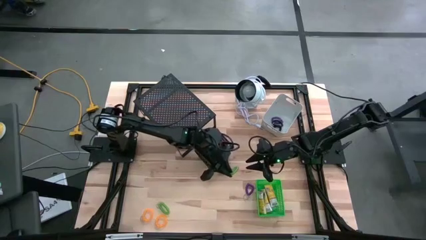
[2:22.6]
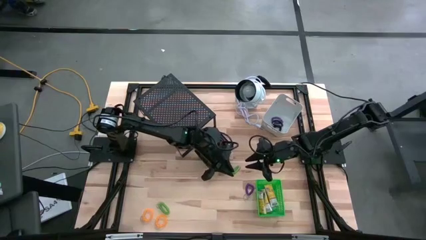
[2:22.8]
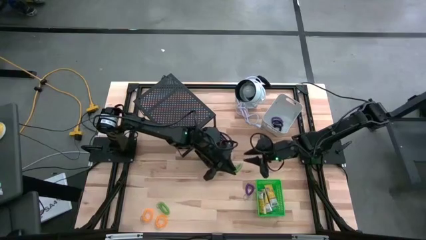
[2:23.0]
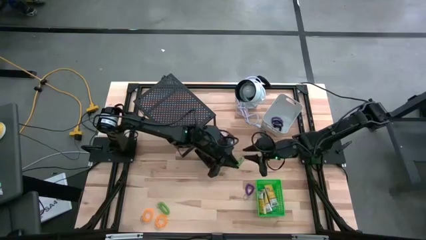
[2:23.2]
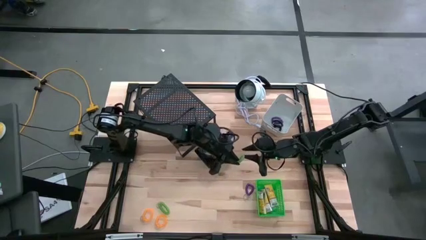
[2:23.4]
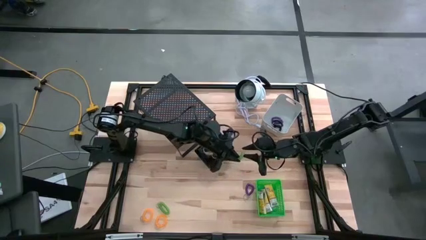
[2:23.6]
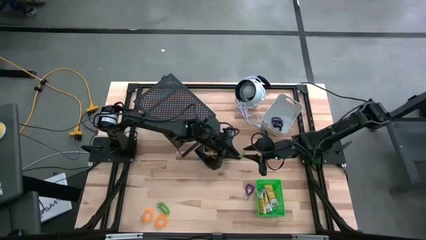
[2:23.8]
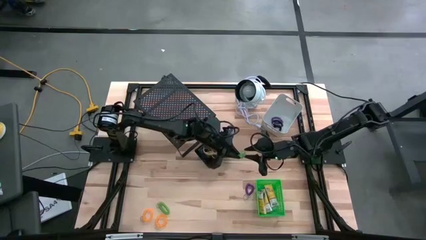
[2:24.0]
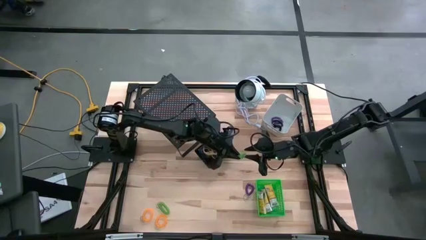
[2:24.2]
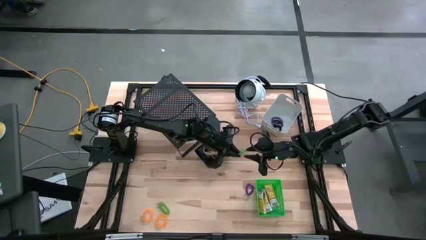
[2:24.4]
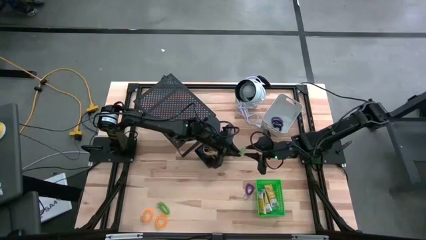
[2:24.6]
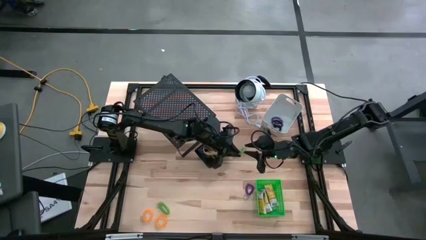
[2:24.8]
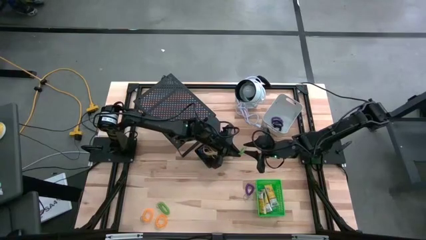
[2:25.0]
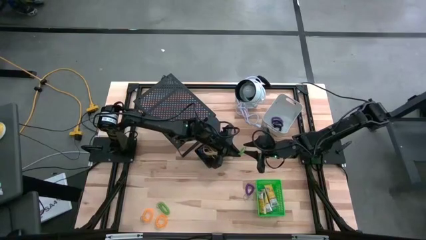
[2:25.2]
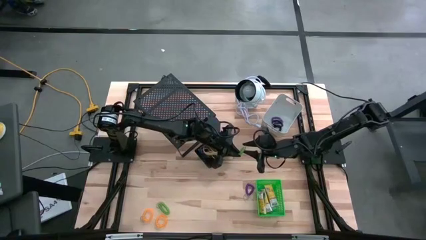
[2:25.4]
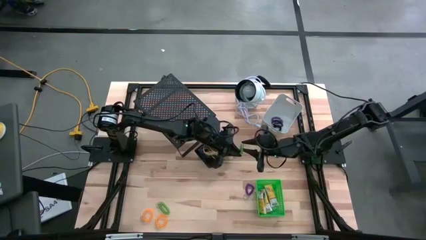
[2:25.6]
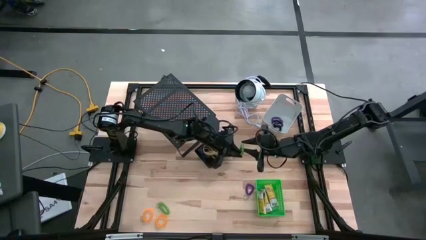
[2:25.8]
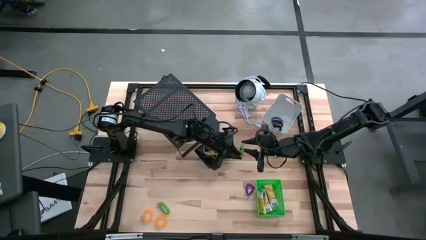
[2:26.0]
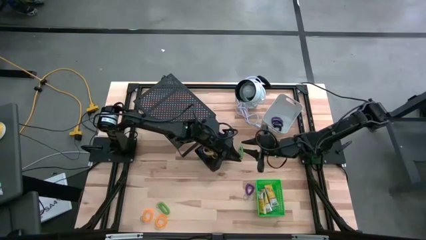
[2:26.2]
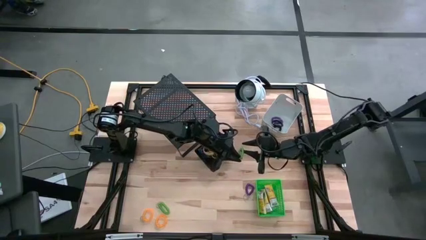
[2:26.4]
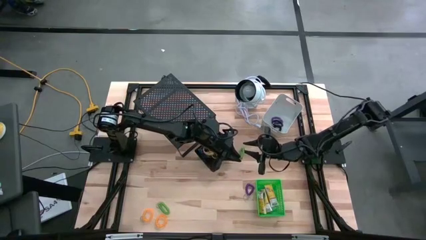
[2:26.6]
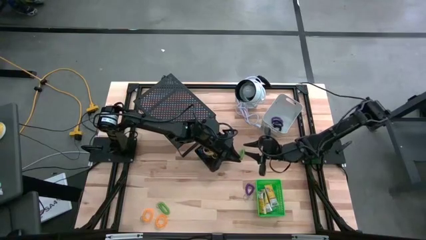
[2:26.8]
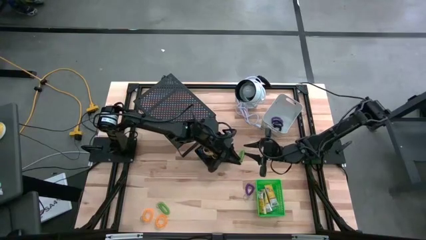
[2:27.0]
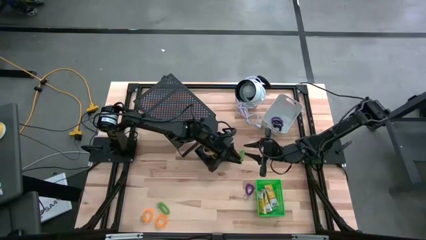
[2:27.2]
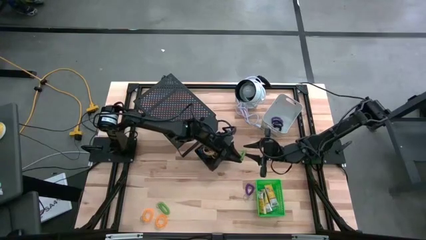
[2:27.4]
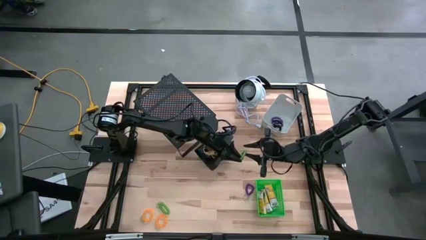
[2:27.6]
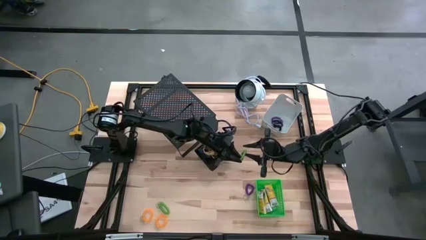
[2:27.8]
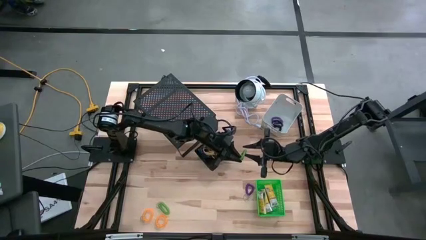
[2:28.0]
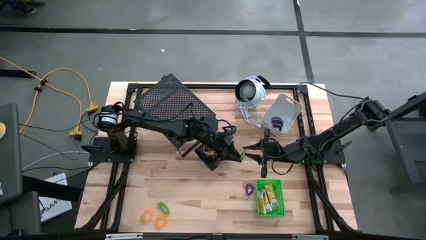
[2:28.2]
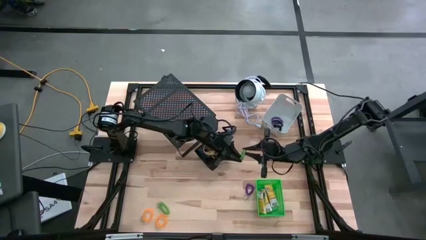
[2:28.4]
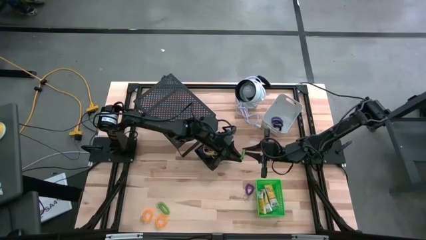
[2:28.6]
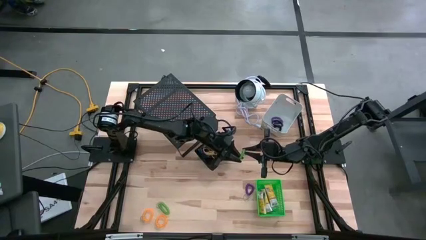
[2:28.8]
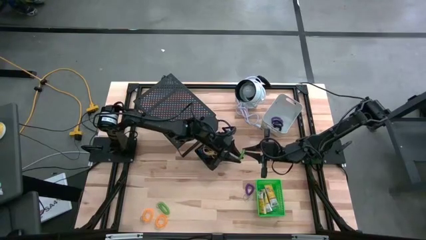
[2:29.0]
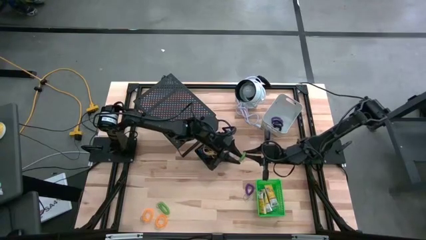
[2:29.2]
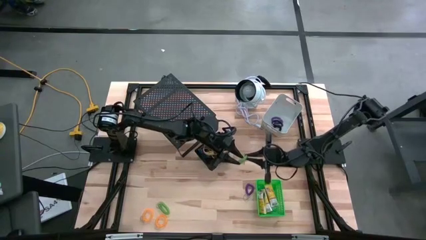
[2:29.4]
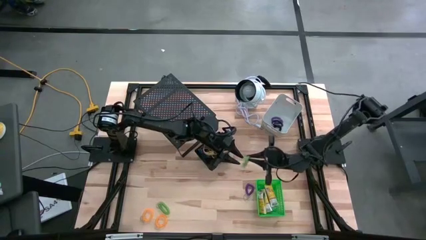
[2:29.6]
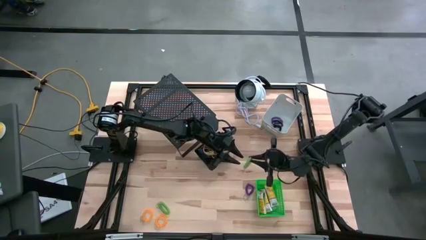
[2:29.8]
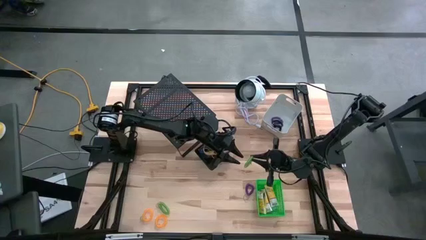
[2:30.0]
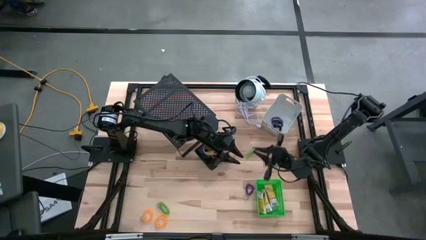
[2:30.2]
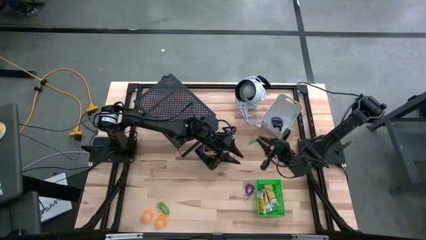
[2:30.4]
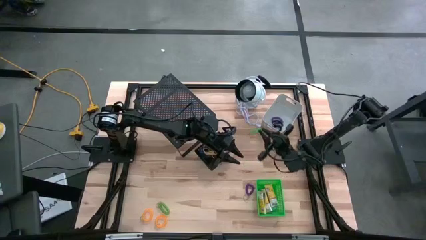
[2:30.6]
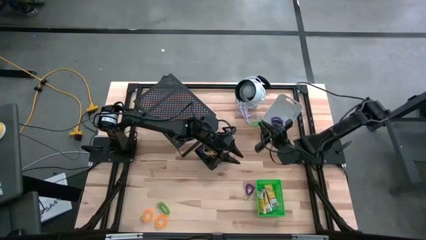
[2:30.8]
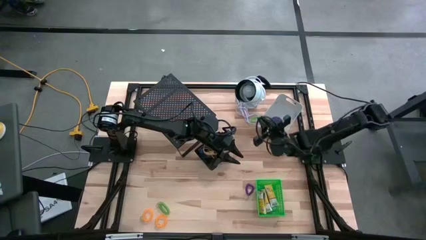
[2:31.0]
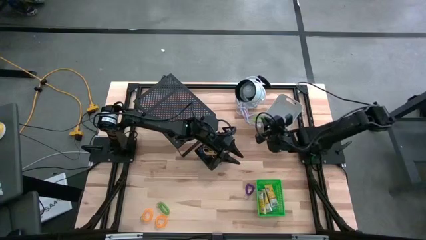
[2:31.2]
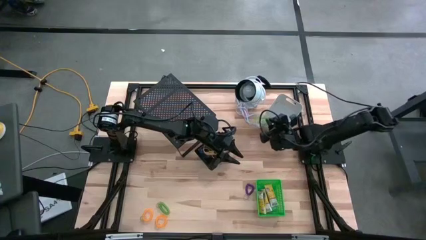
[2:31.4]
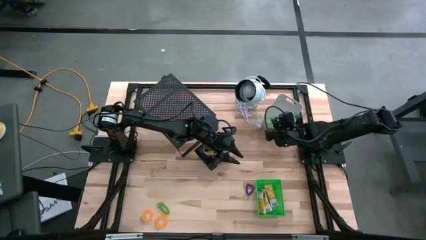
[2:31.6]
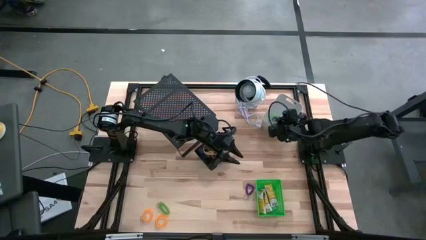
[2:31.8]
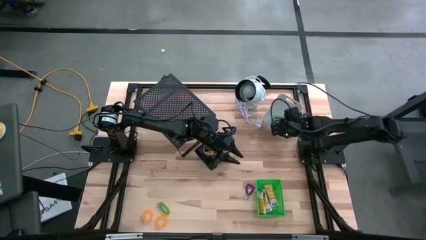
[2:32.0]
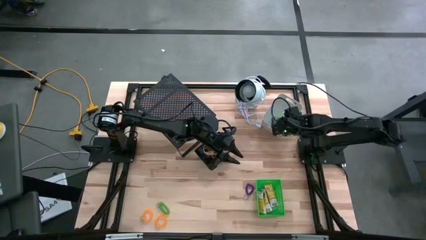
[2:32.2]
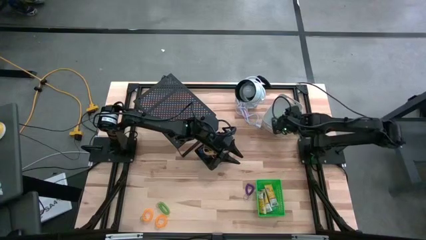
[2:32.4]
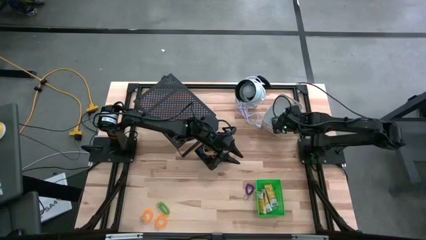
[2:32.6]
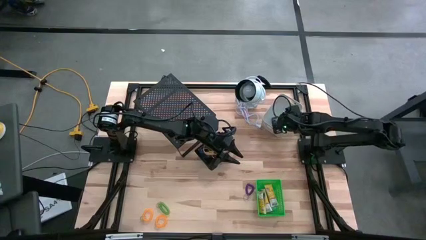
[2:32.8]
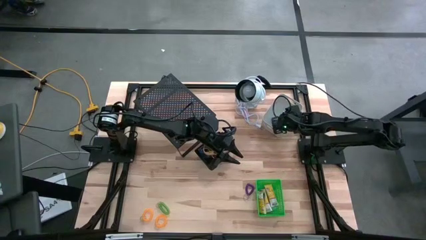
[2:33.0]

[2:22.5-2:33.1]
Task: Pick & Place Office Desk Supplies
Put the bottom green spring keychain into the white bin

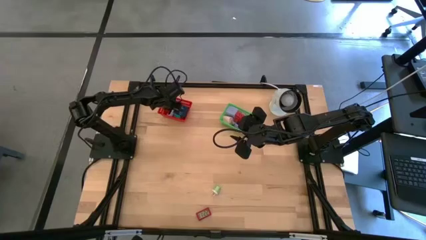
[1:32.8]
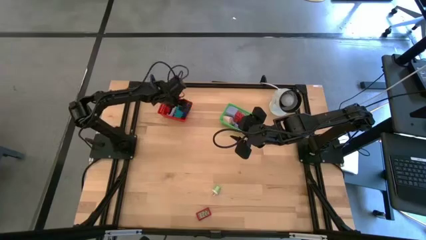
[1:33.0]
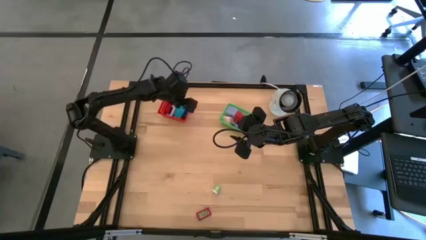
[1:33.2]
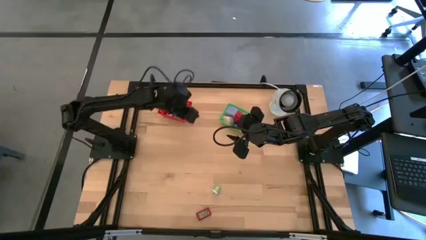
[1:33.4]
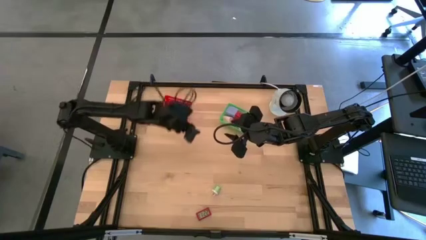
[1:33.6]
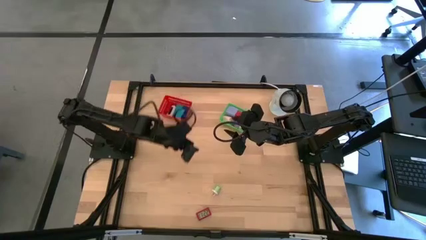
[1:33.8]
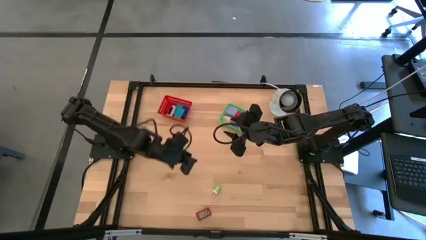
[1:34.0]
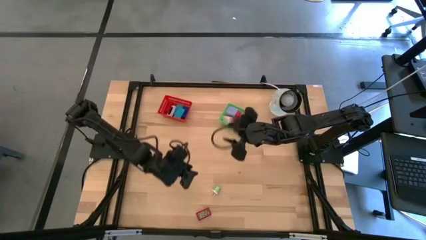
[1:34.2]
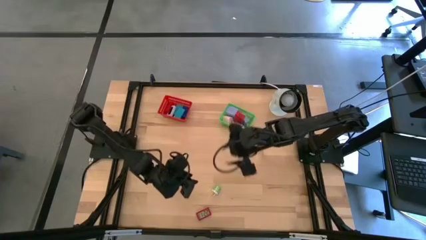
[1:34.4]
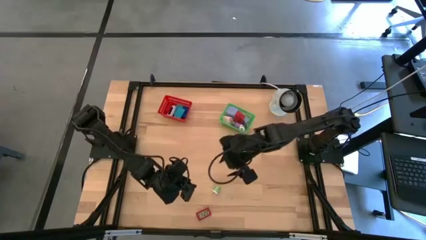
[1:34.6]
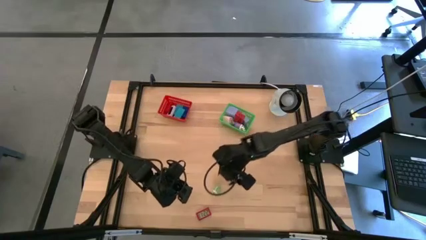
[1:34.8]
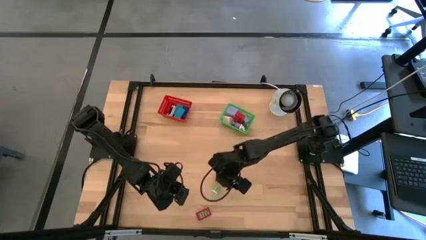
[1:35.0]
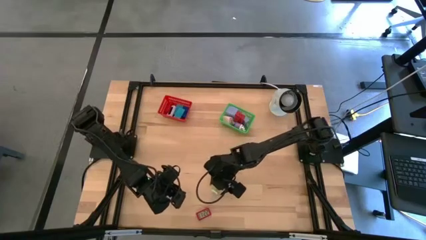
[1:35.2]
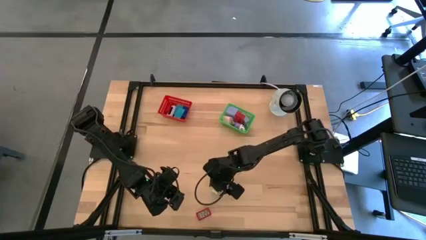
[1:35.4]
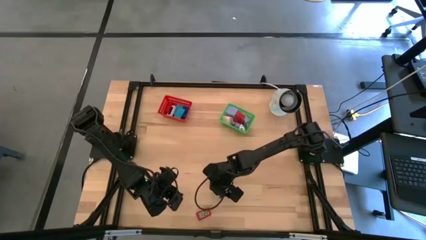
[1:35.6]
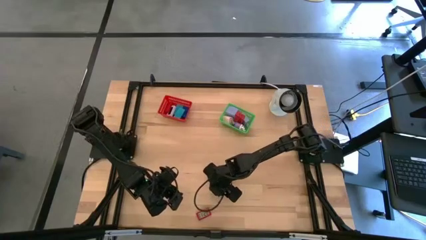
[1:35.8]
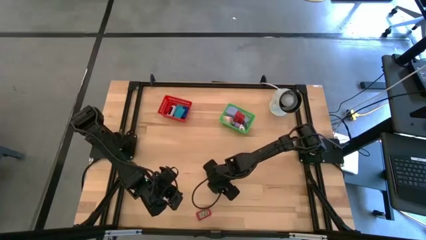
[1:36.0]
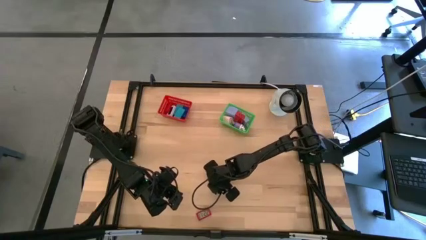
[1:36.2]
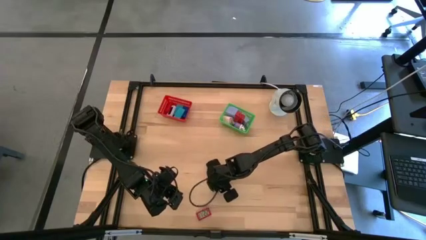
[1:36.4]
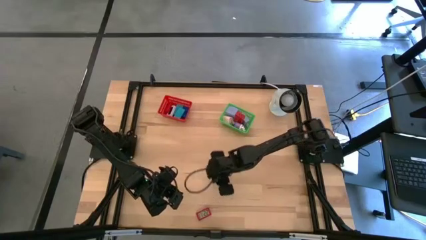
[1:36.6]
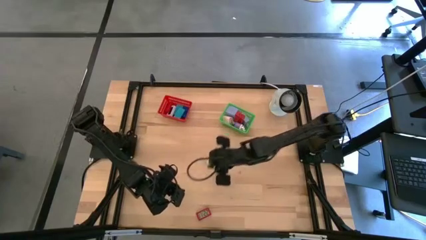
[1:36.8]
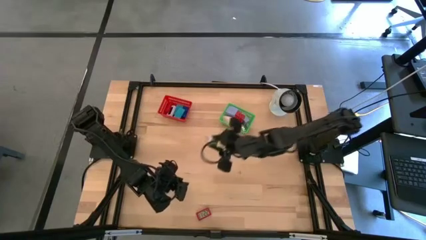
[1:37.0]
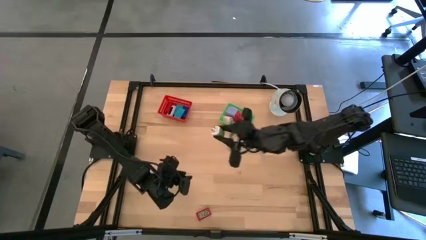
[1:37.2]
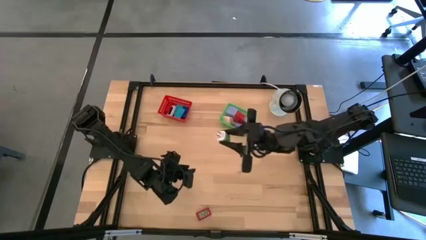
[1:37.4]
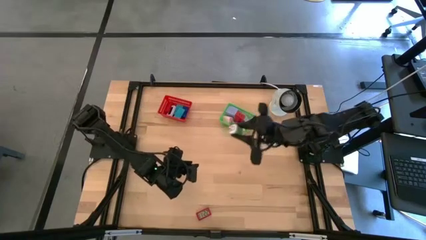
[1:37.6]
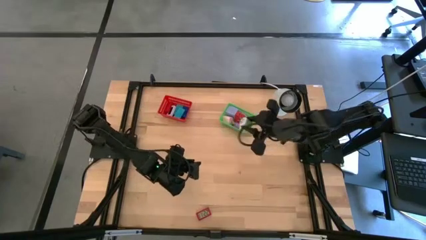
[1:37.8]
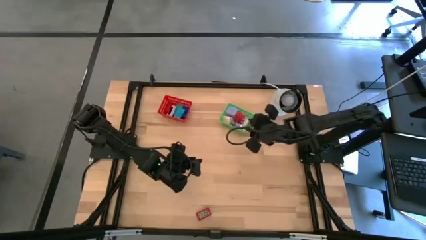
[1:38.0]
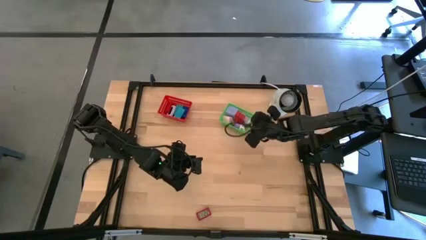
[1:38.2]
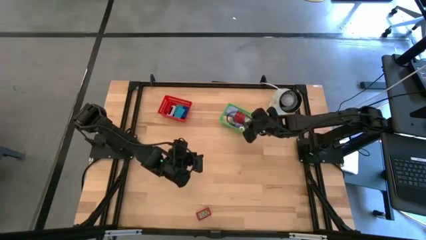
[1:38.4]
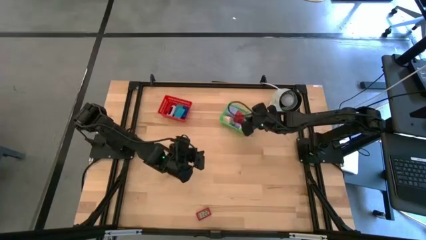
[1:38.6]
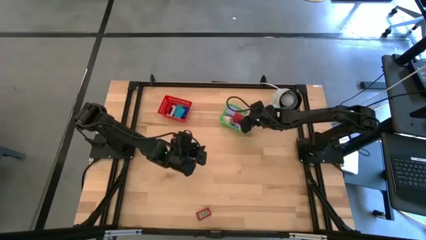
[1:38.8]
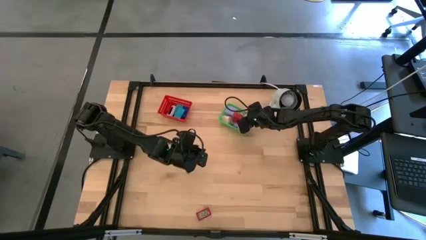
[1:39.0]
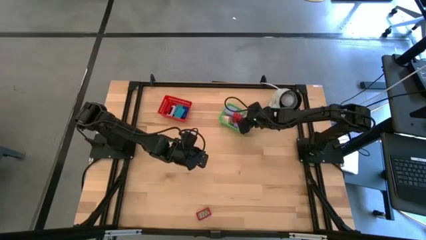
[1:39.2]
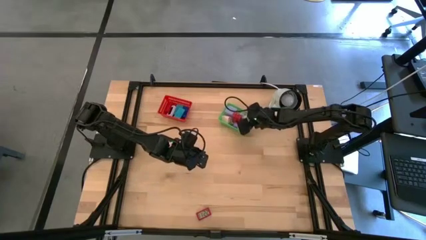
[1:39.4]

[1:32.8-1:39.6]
Task: Pick & Place Office items
Put the green charger adapter into the green bin
